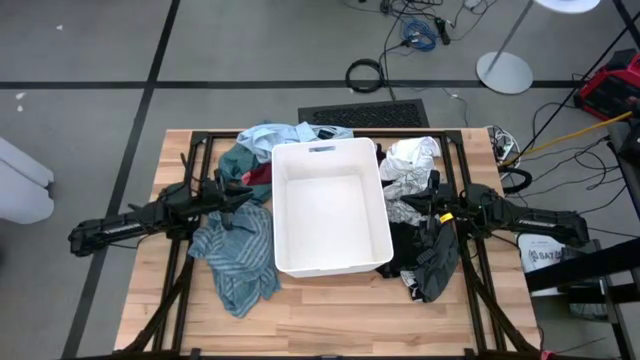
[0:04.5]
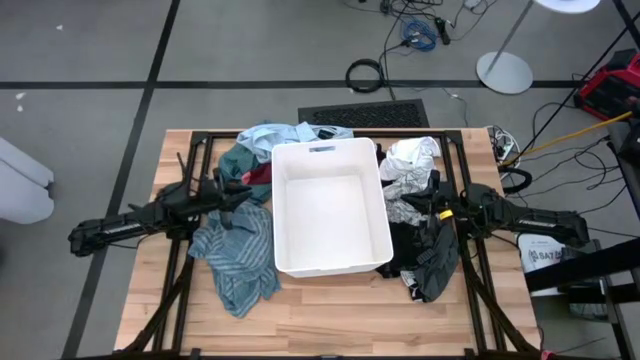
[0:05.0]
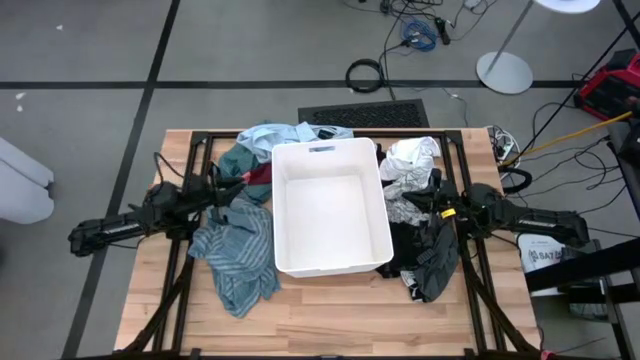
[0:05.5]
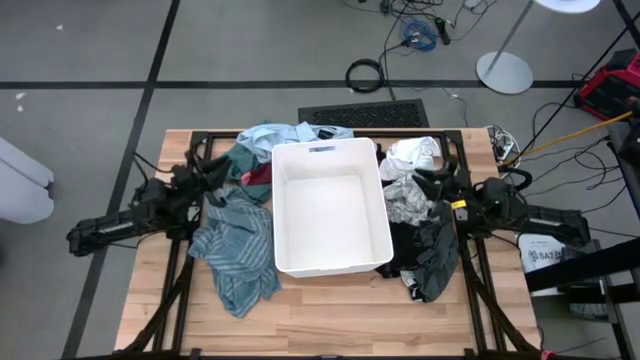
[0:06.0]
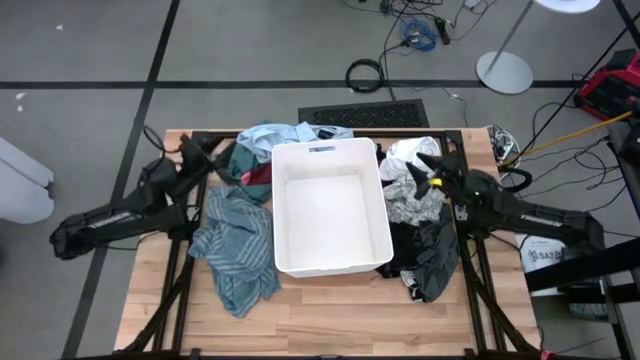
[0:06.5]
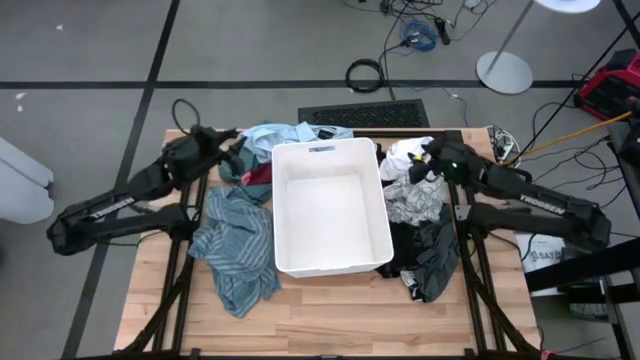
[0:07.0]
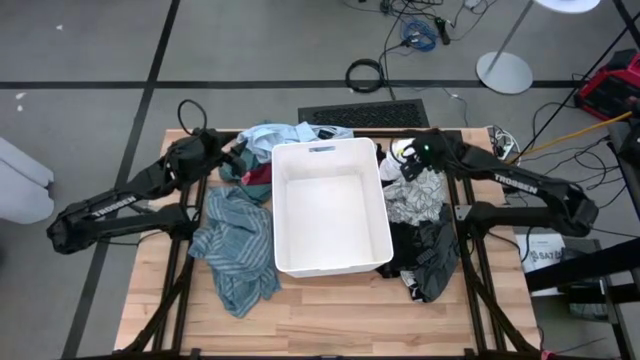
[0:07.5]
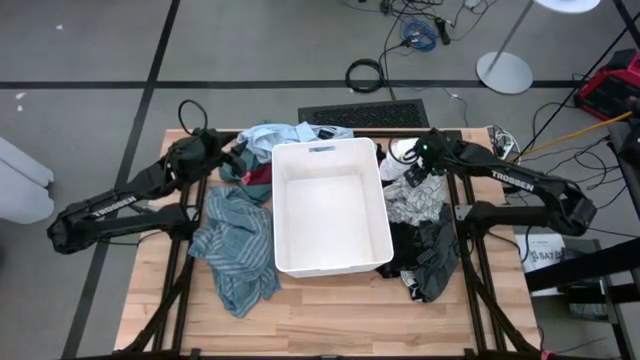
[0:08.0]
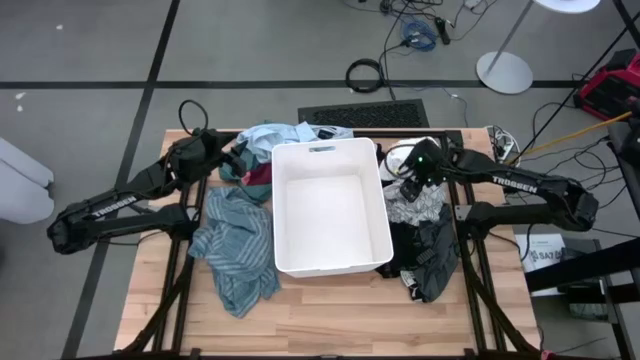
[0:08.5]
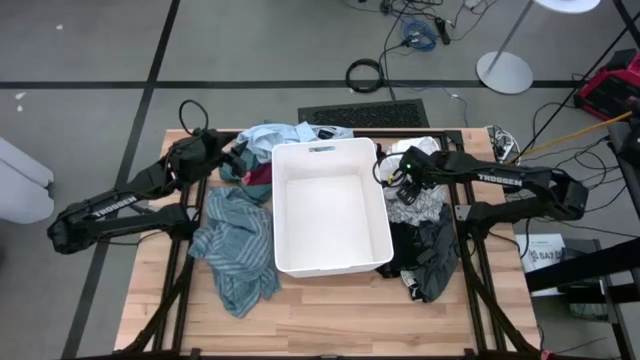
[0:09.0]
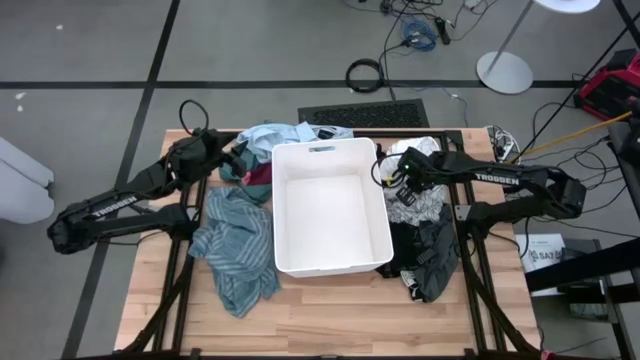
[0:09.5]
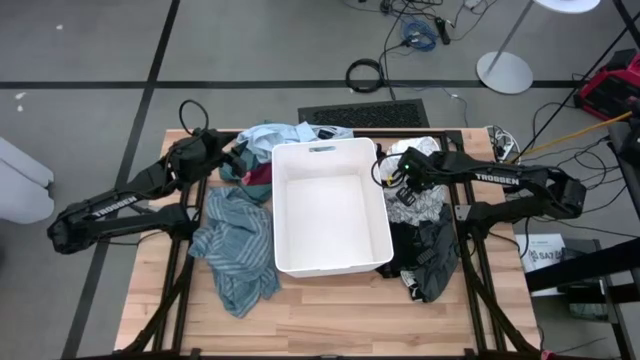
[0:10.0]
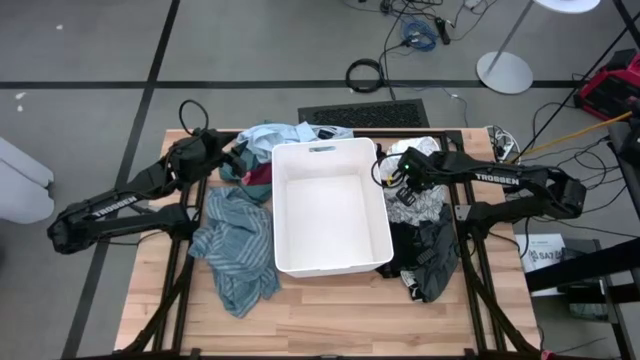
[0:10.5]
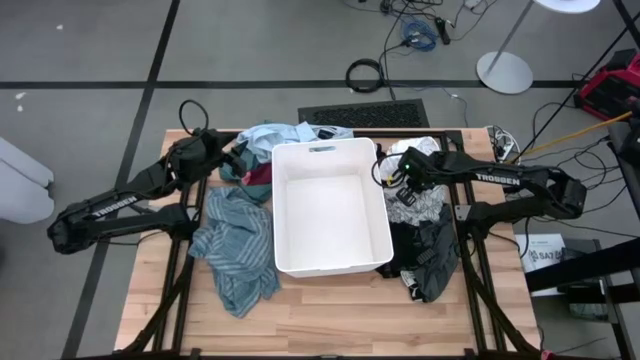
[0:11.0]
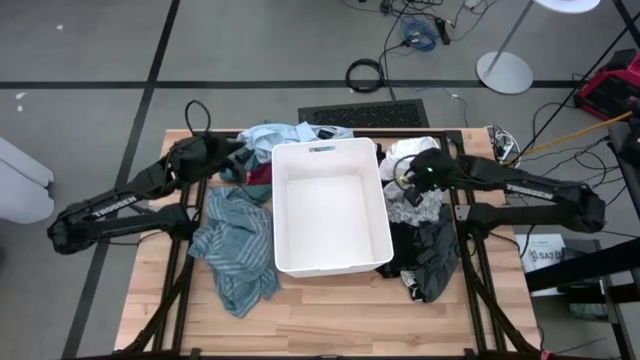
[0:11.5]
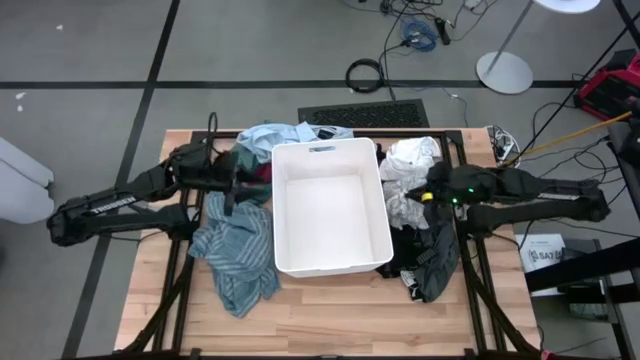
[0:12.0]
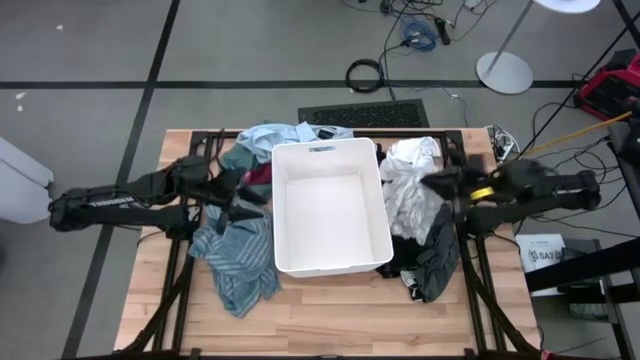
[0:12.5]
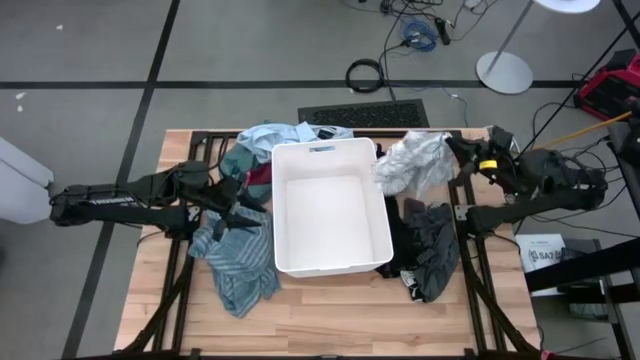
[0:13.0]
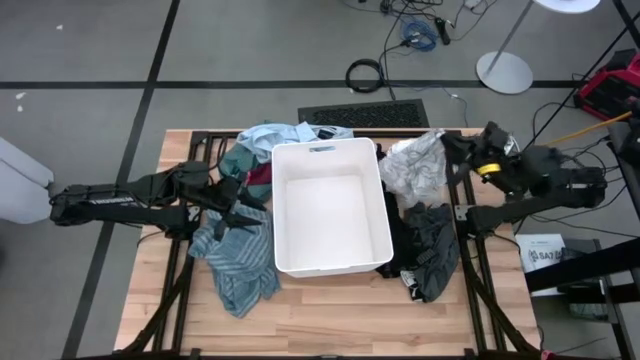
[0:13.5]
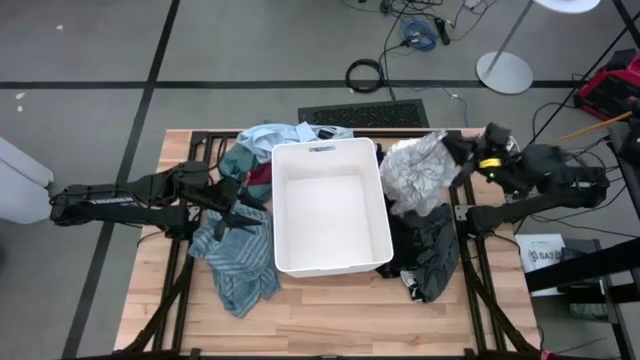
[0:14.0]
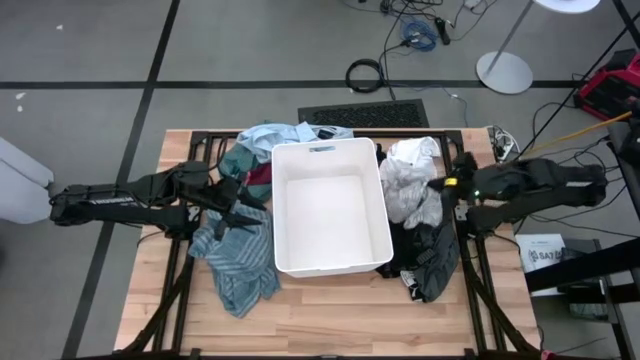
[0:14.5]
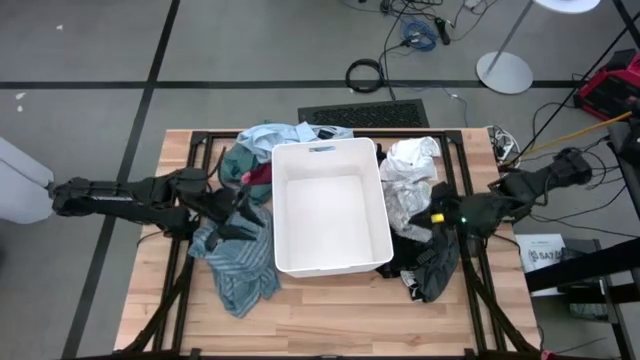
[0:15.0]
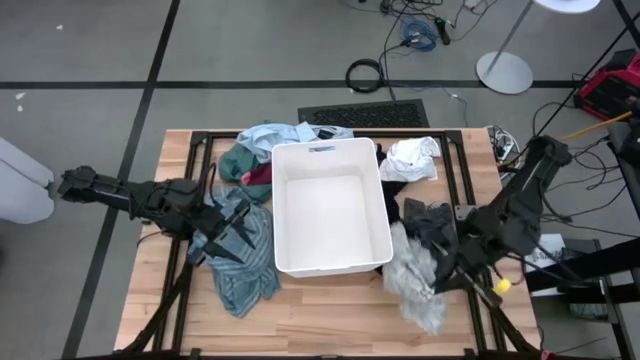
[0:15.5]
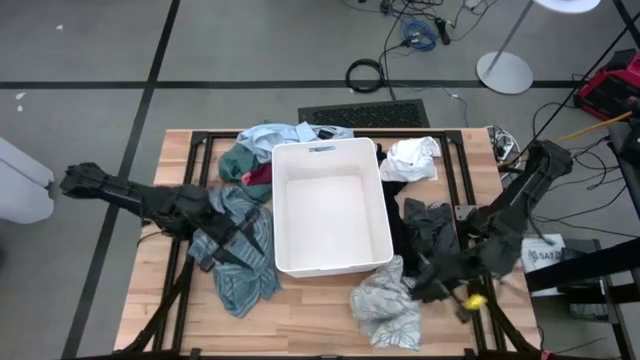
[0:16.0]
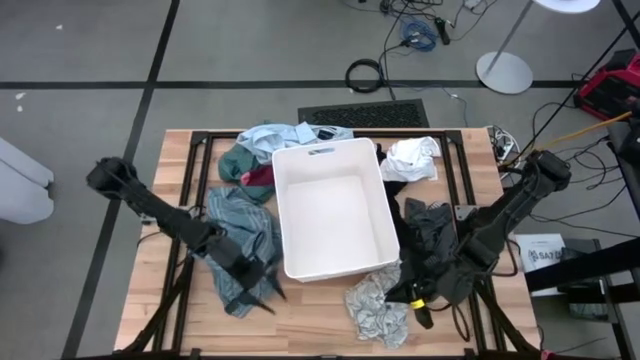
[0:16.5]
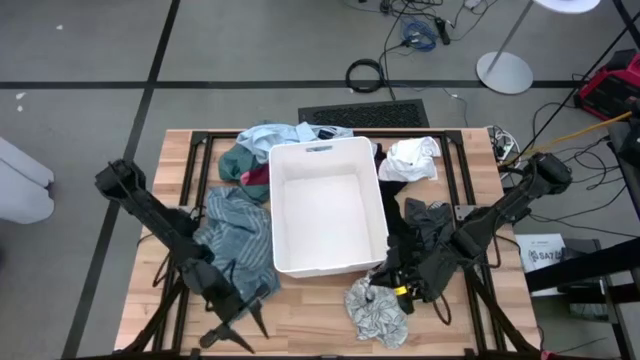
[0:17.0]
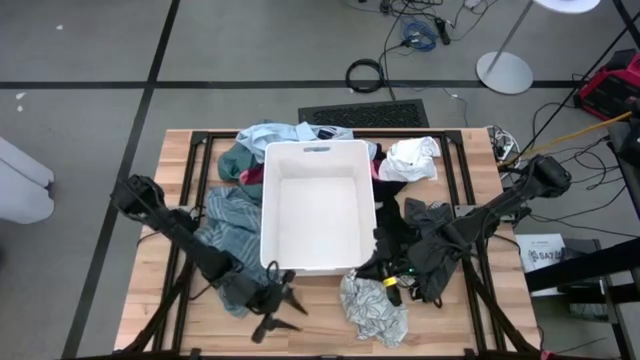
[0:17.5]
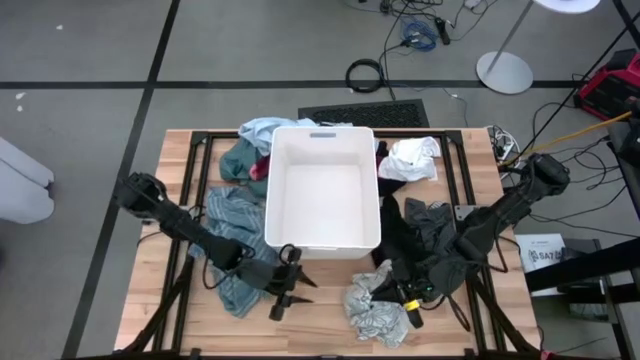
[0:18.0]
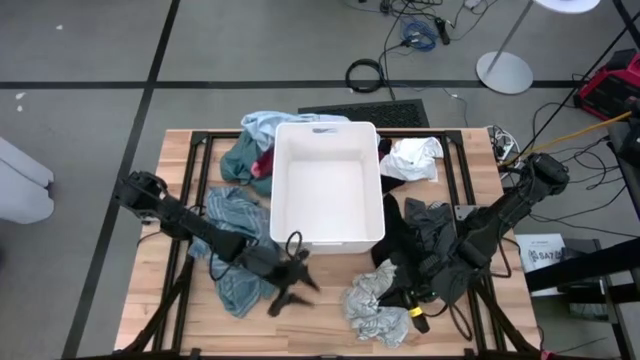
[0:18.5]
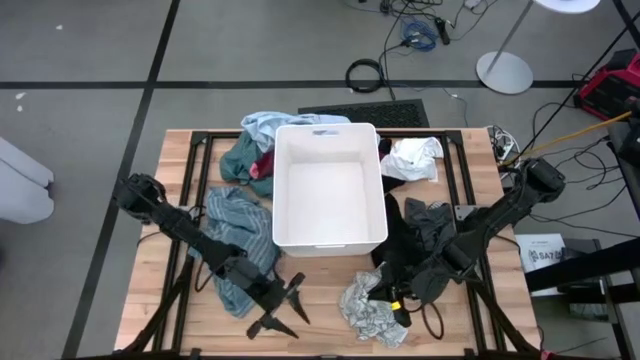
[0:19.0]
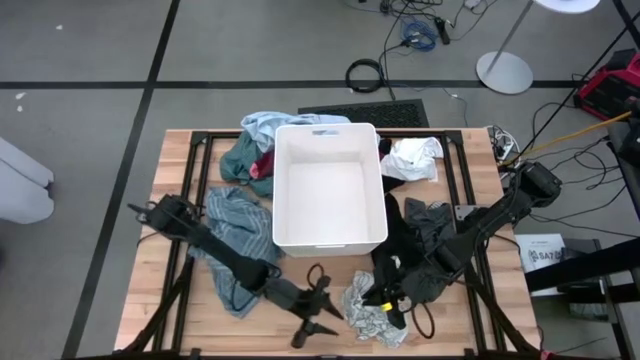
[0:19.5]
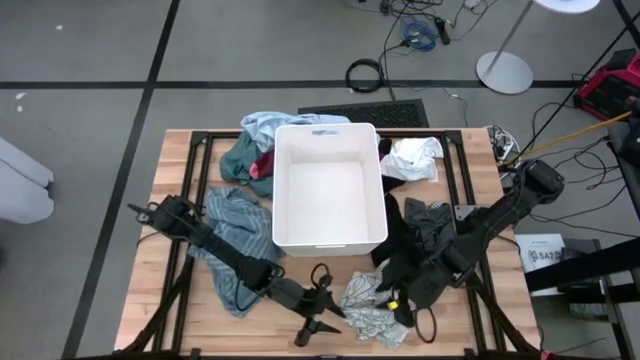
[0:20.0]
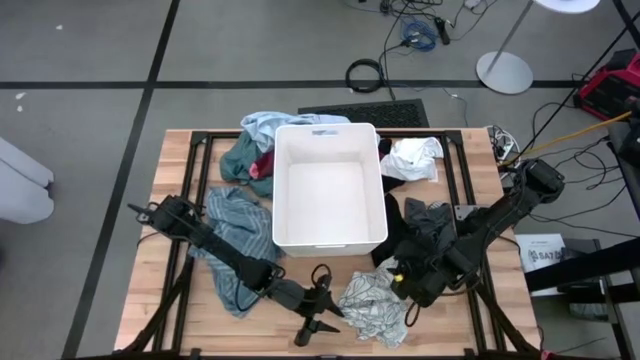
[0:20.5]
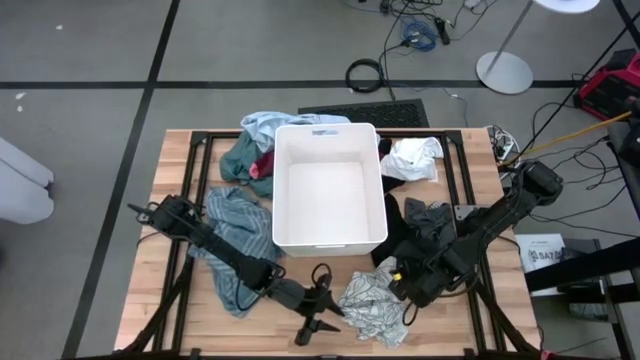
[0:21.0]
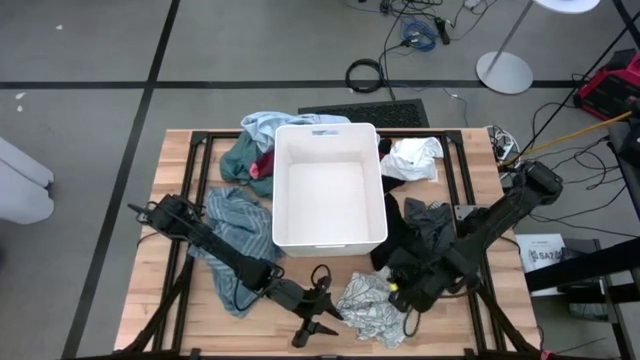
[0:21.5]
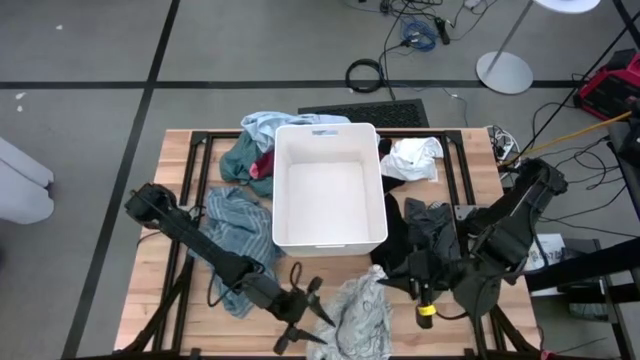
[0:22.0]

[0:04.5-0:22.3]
Task: Sort clothes
Put the white and black towel into the white laundry organizer

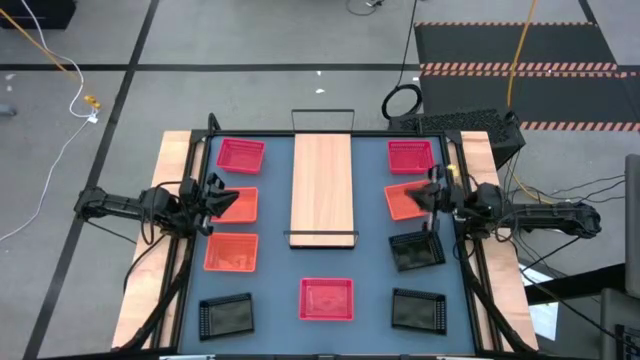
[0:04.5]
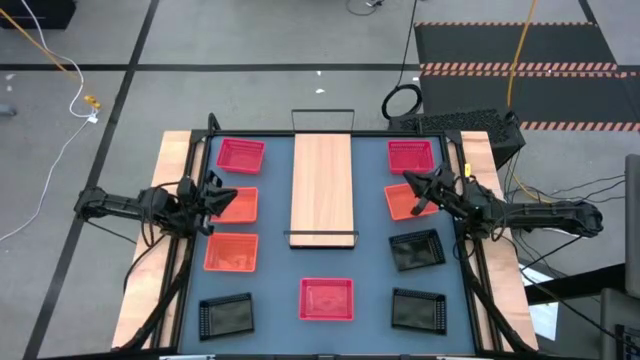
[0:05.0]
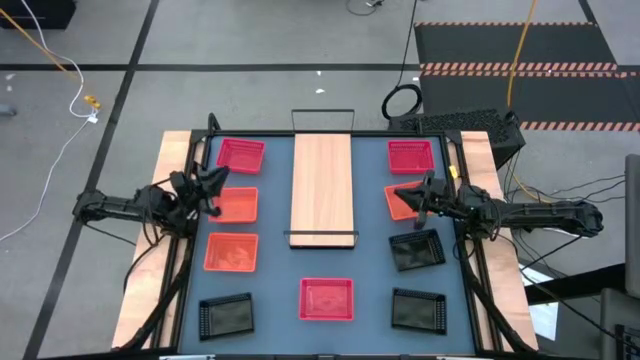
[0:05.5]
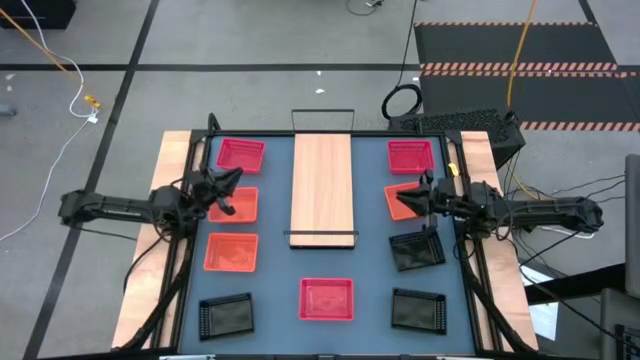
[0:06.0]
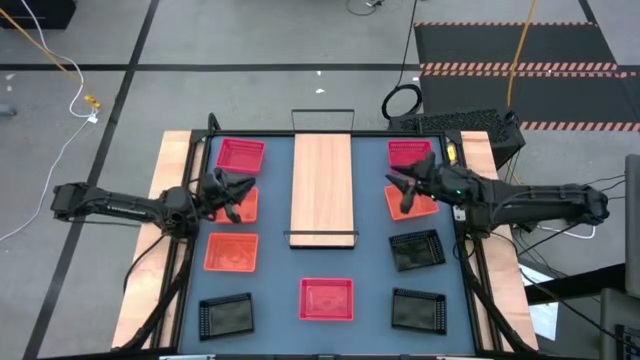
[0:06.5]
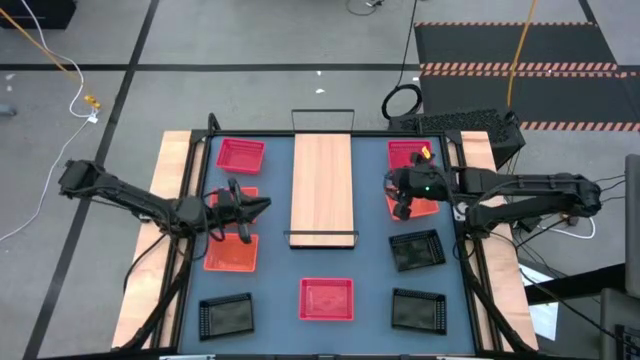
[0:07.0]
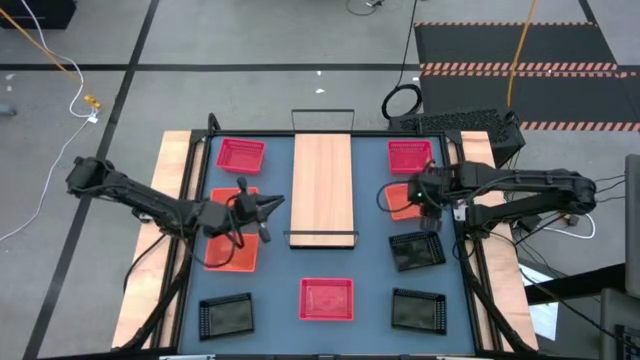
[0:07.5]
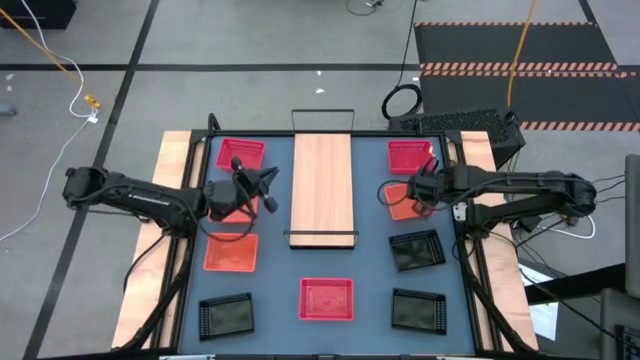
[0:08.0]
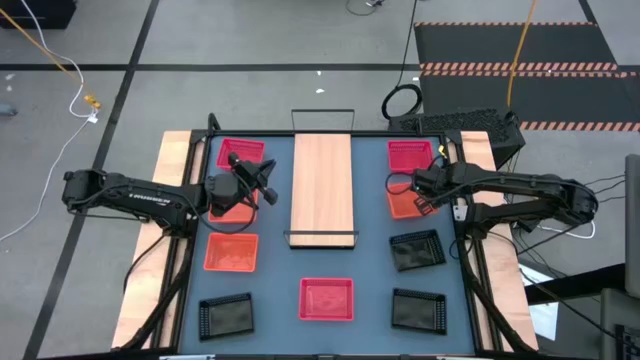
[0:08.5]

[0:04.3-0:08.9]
Task: Stack baskets on shelf by color
Put the top right orange bin on the shelf
